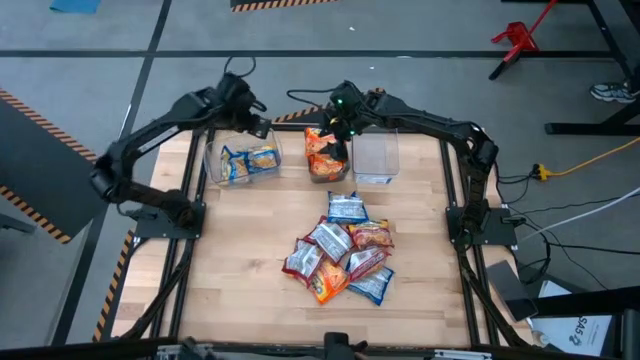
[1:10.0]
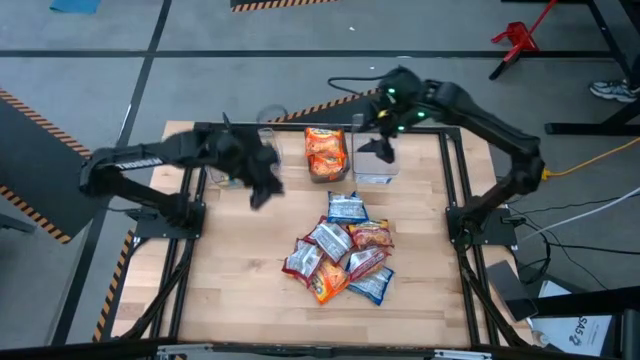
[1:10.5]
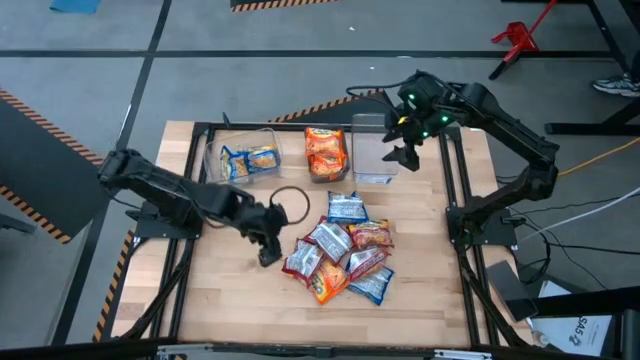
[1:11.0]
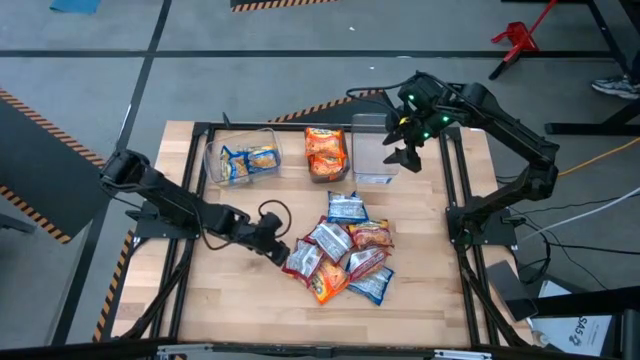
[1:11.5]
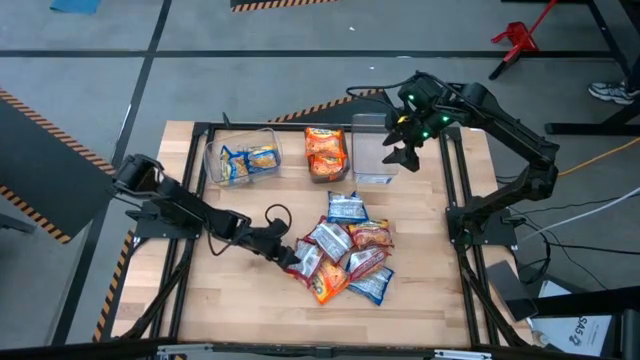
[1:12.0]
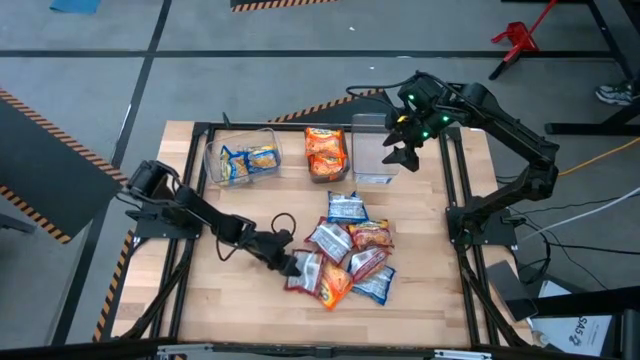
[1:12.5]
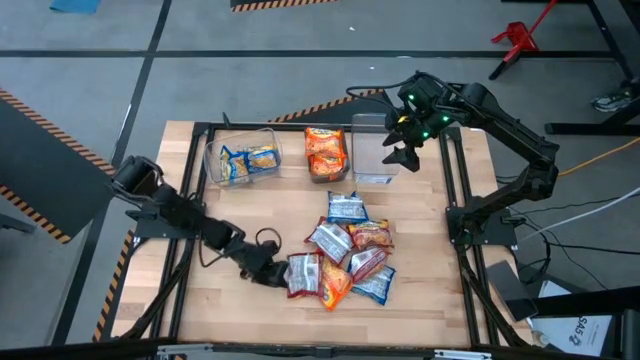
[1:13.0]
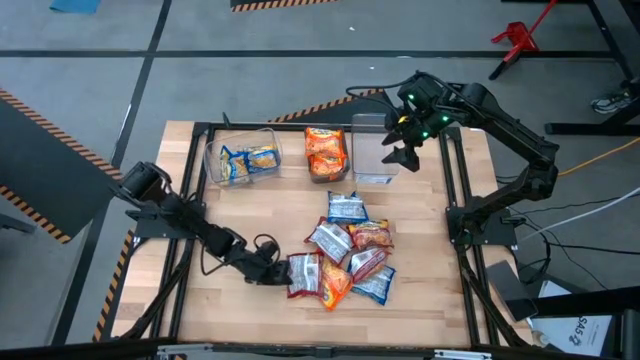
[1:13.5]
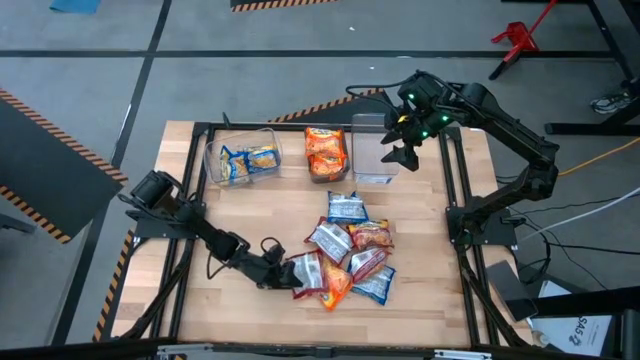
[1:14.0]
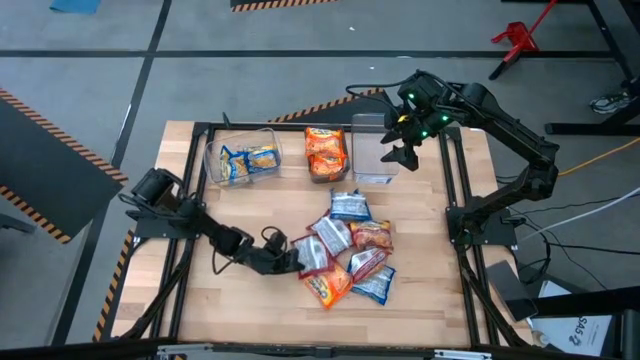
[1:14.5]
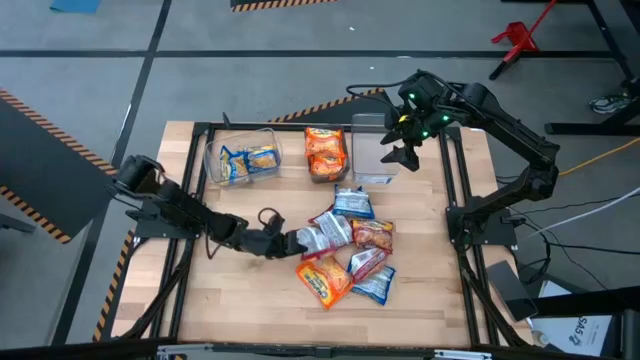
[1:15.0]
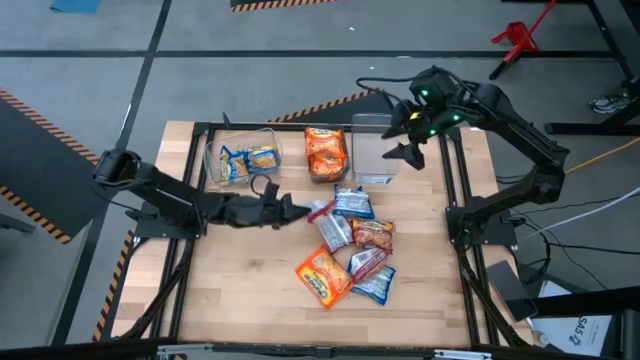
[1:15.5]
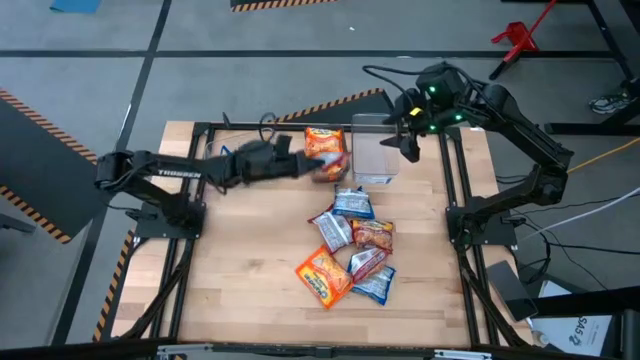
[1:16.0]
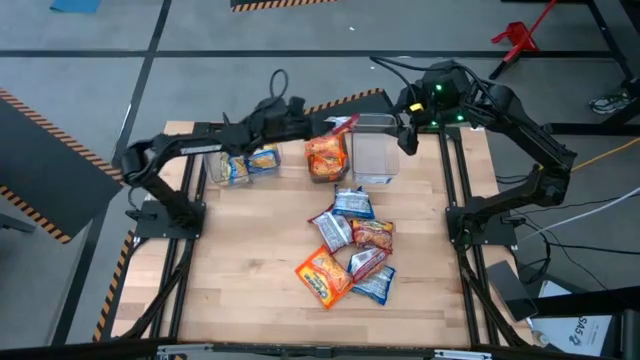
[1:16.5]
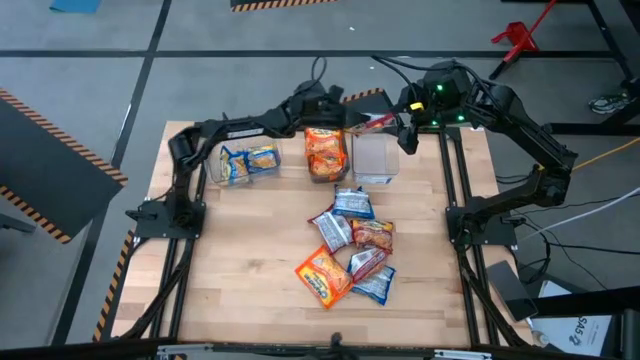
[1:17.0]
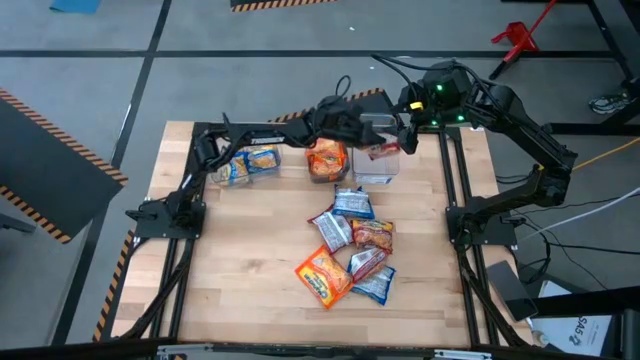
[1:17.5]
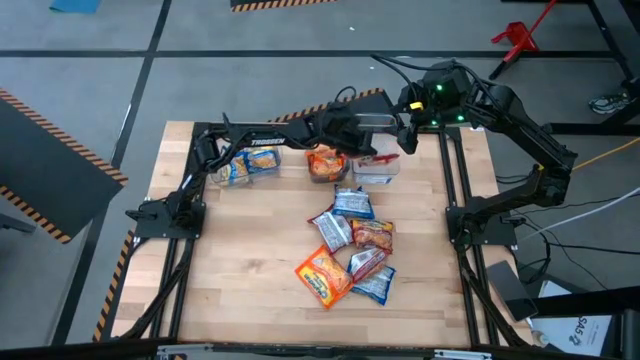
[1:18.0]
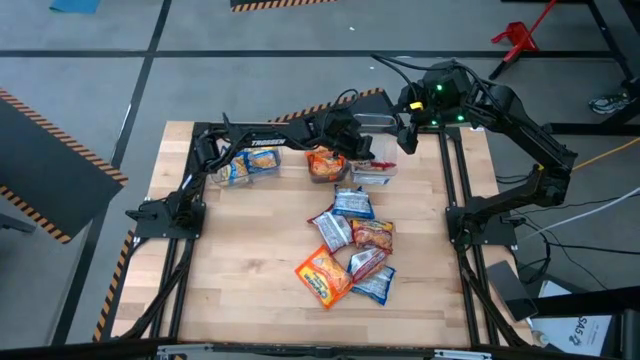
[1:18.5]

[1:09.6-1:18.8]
Task: Sort Maruchan noodles
Put the red noodle pack into the right transparent bin

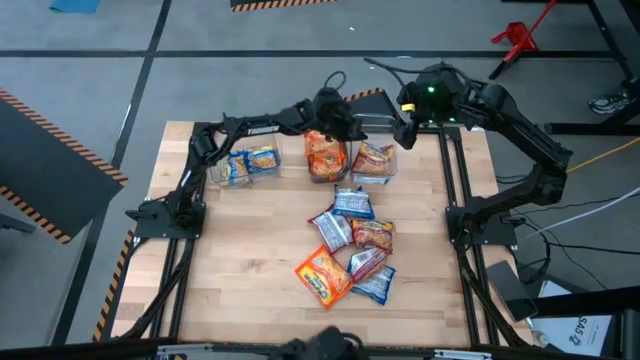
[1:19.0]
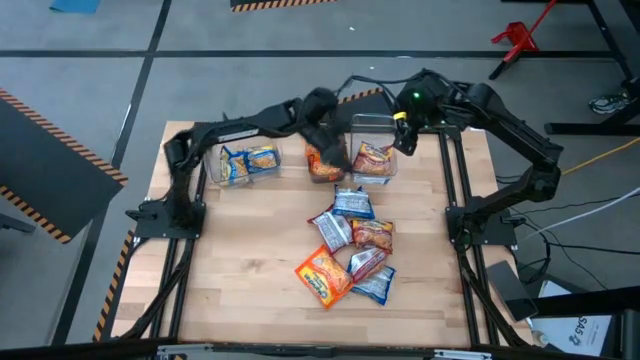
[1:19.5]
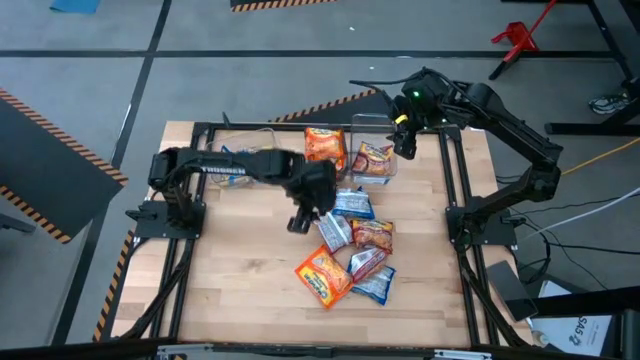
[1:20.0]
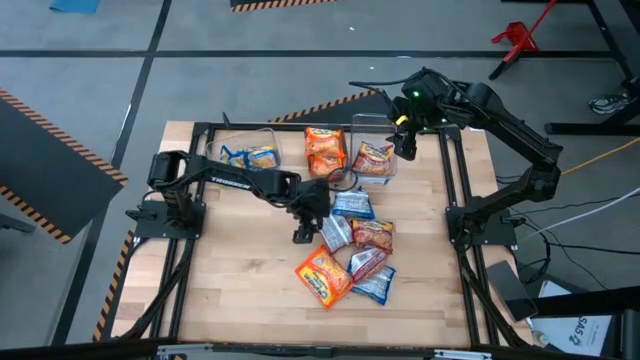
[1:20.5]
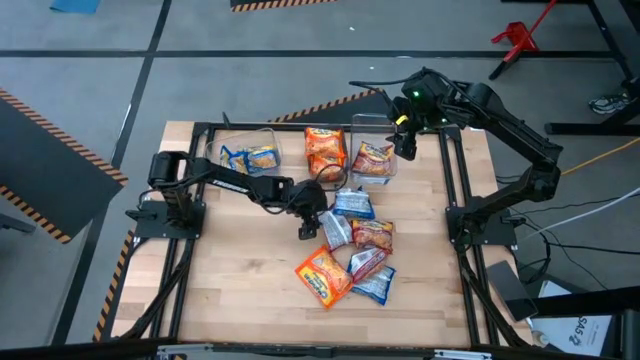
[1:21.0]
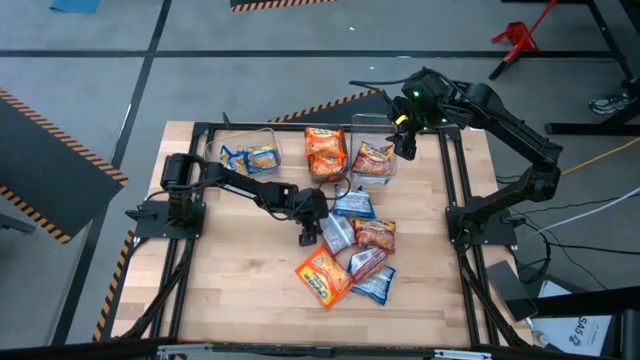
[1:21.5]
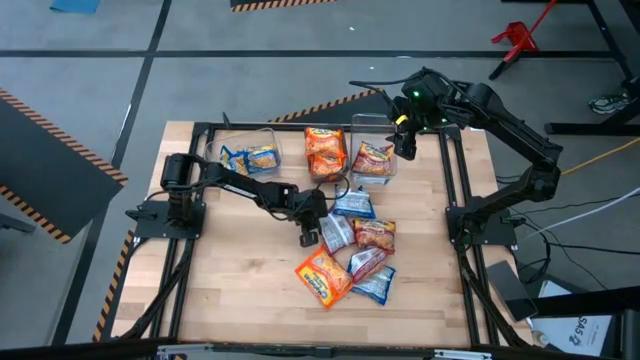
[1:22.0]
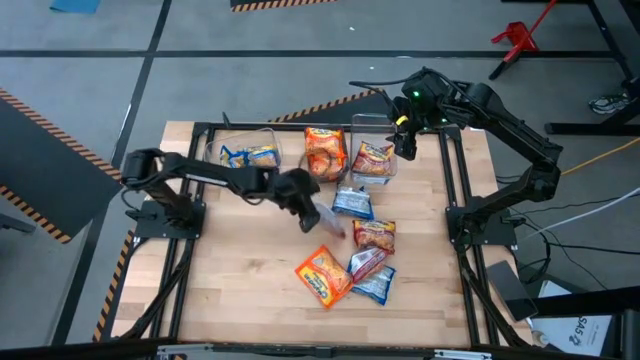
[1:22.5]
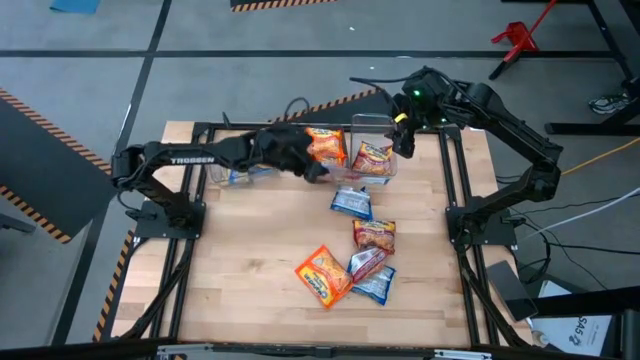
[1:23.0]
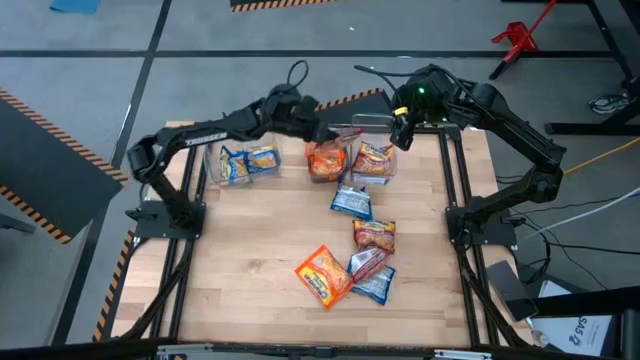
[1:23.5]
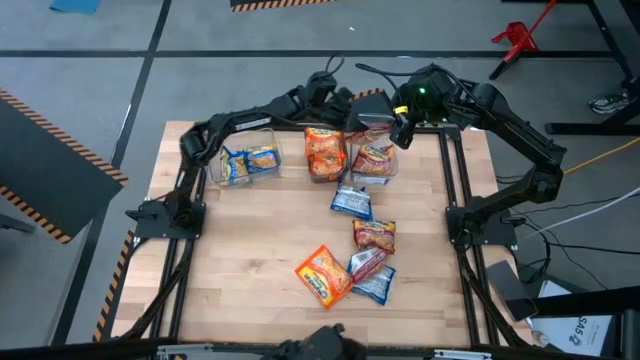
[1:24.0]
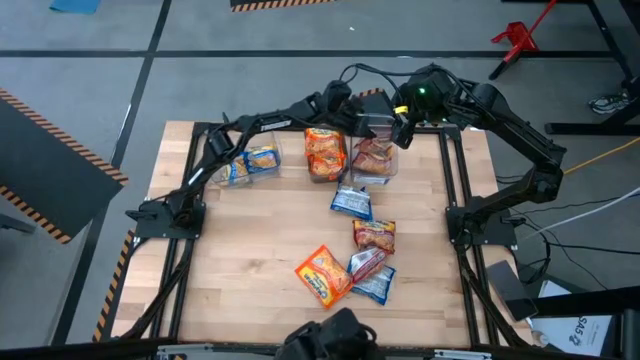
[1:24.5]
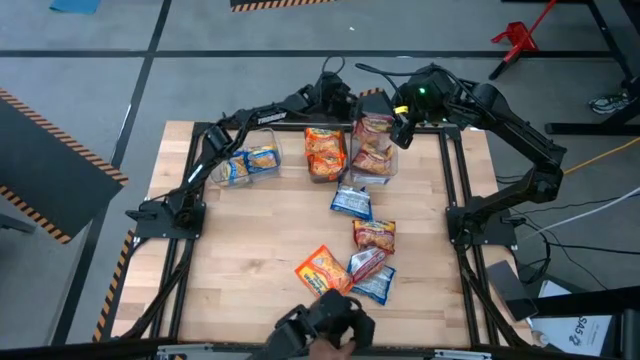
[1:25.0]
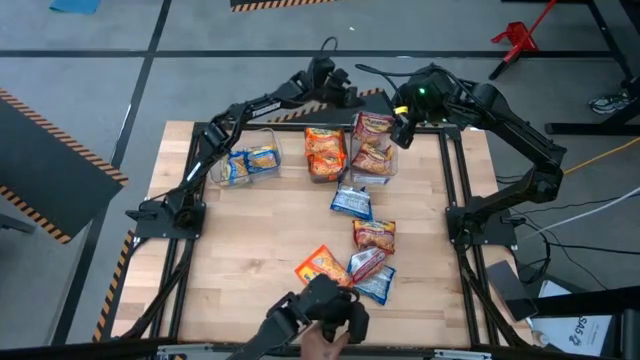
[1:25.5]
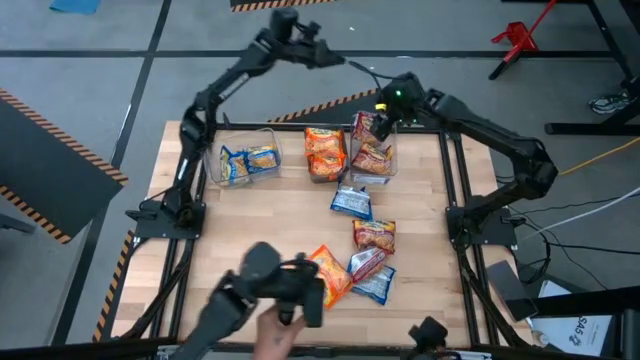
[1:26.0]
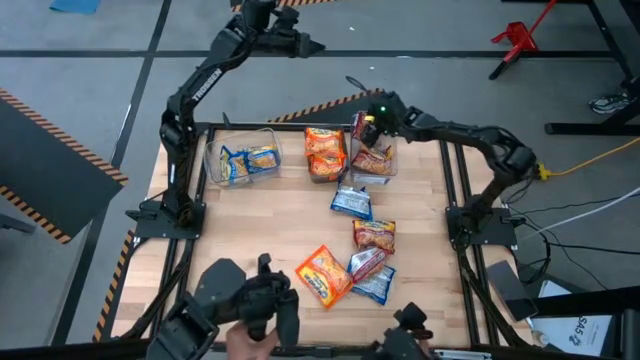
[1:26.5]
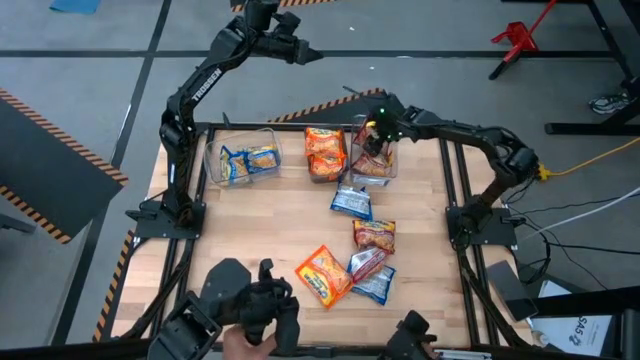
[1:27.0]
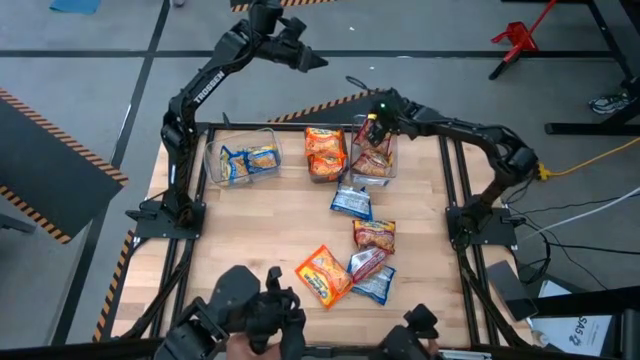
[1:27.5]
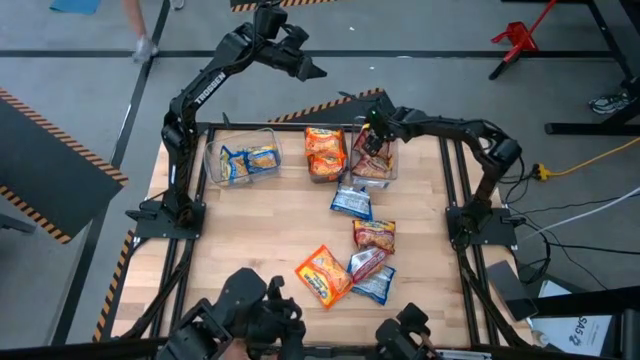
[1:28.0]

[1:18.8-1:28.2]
Put the red noodle pack into the right transparent bin
